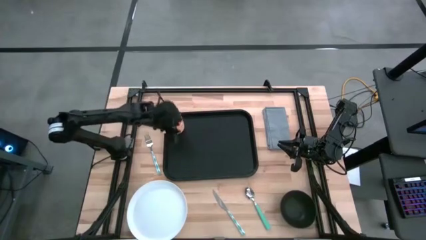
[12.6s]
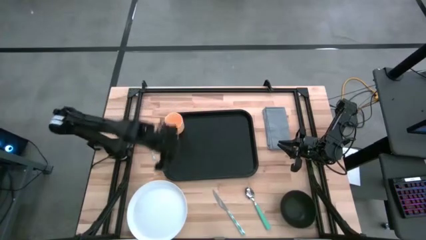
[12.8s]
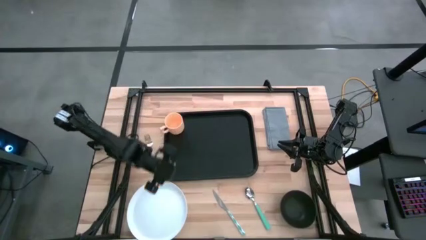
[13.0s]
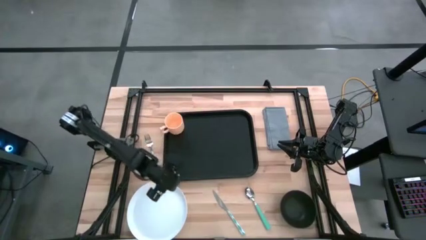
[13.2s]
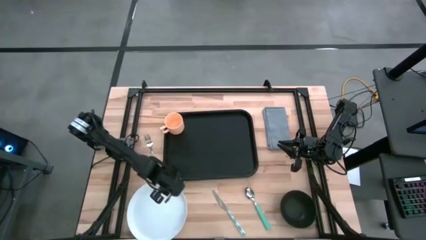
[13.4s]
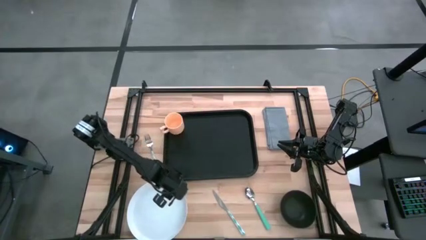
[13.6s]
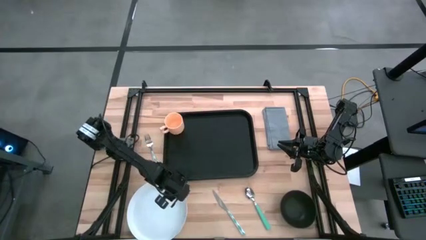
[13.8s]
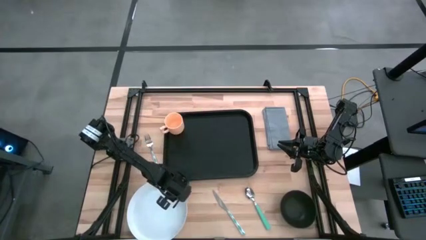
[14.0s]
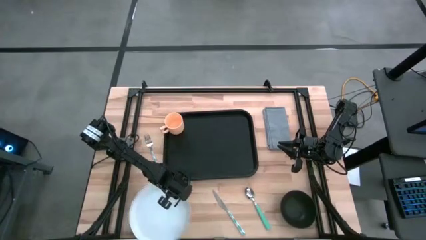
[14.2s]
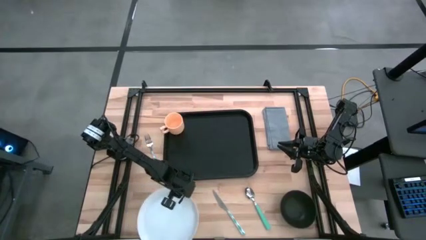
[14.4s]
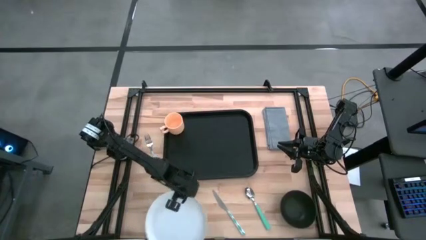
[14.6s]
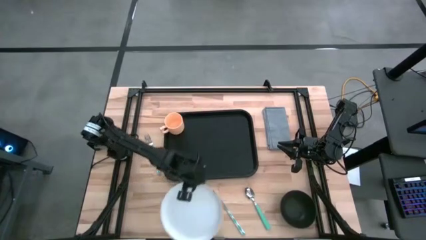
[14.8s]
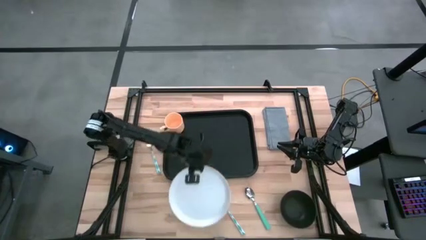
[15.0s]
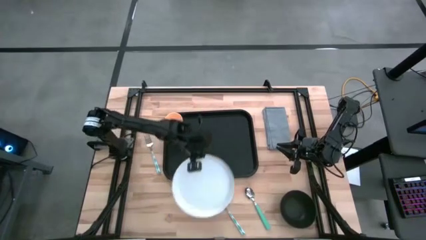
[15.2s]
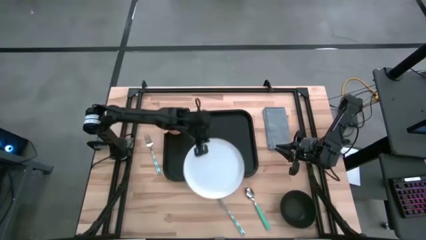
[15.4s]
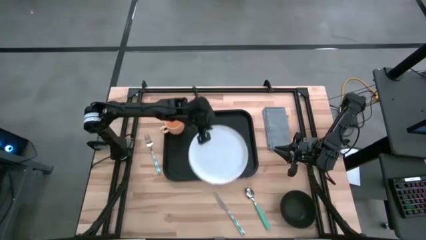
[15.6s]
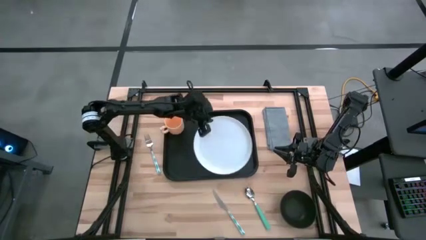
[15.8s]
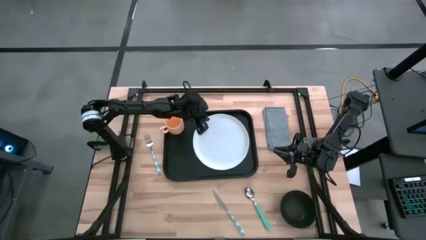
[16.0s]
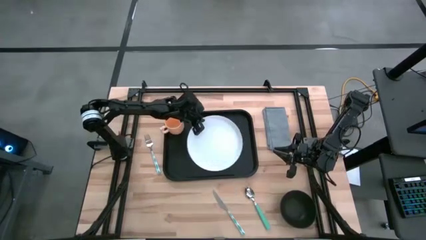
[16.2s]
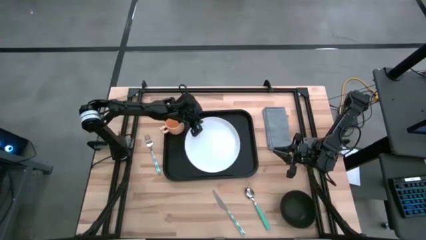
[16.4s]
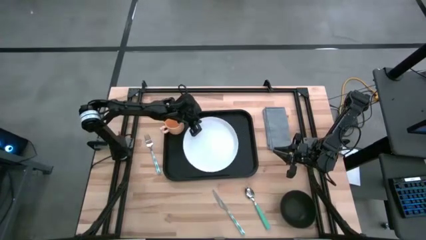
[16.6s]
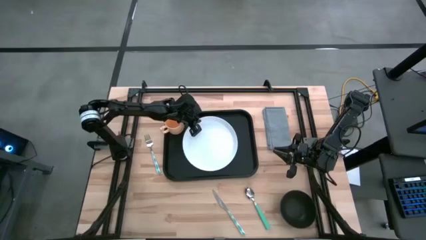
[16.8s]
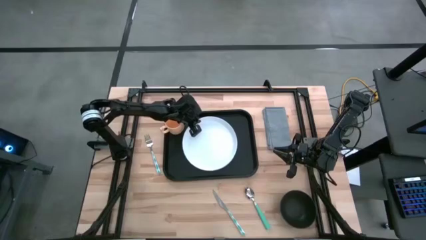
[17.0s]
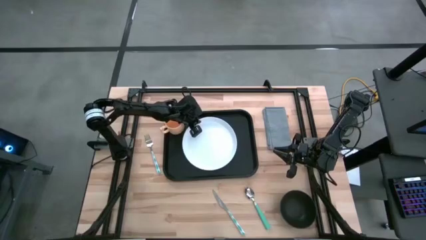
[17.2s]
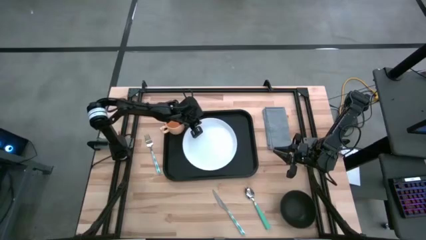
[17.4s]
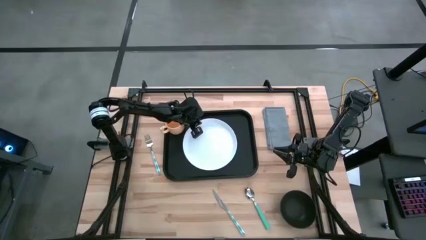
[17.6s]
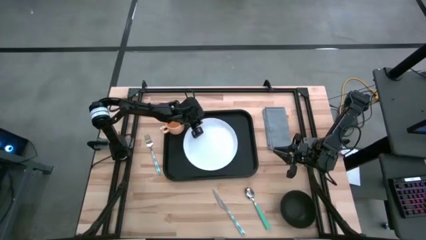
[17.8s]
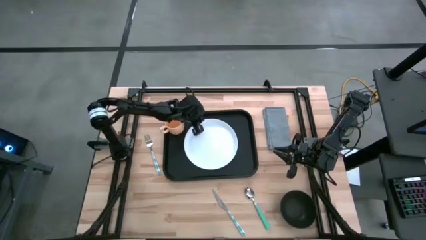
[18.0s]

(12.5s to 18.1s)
Task: Set up tray
Put the white plate on the black tray to the right of the orange mug

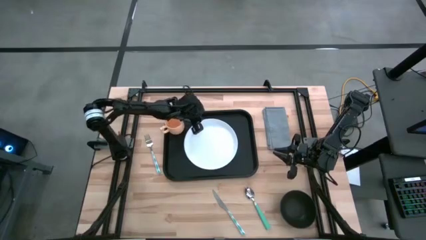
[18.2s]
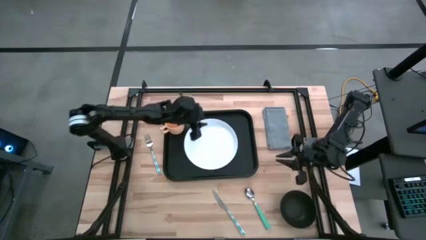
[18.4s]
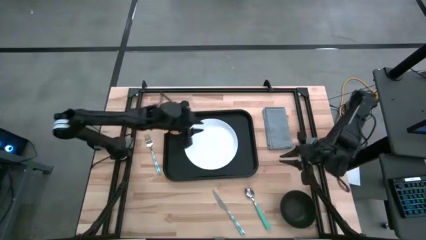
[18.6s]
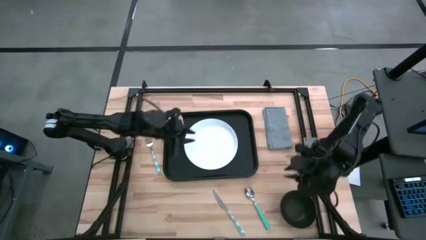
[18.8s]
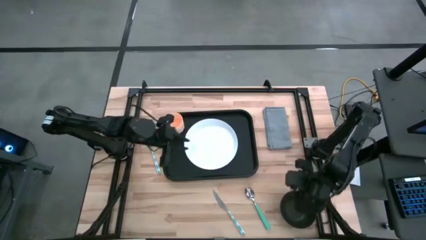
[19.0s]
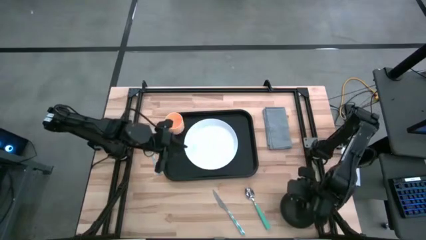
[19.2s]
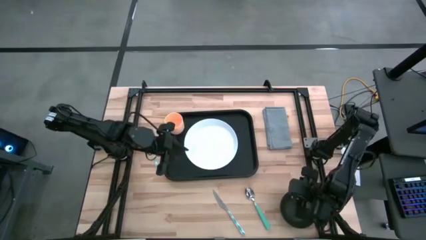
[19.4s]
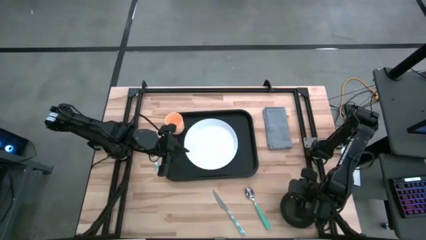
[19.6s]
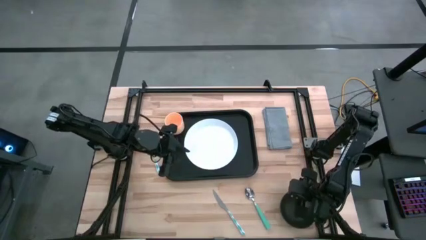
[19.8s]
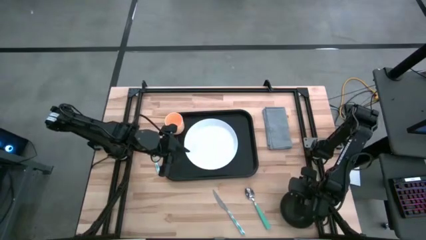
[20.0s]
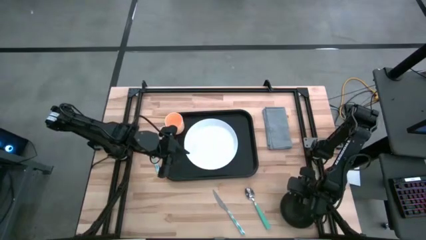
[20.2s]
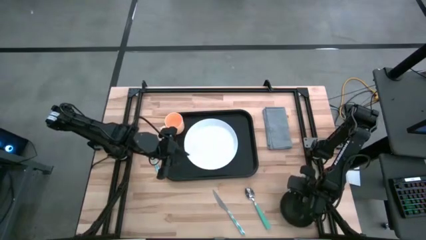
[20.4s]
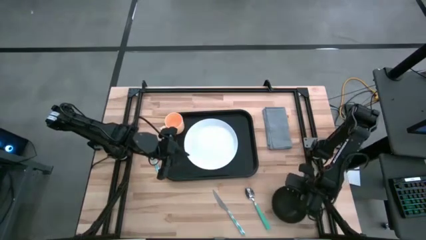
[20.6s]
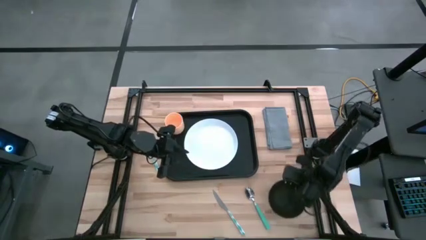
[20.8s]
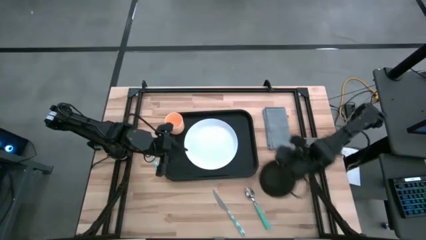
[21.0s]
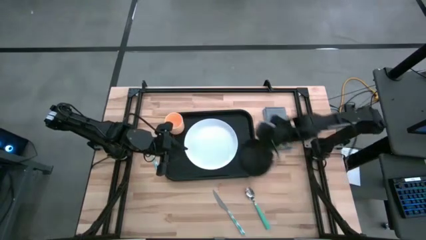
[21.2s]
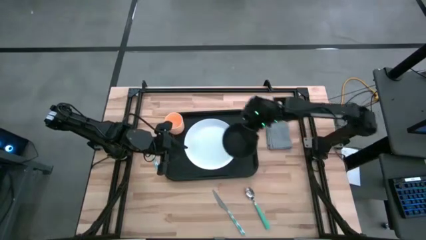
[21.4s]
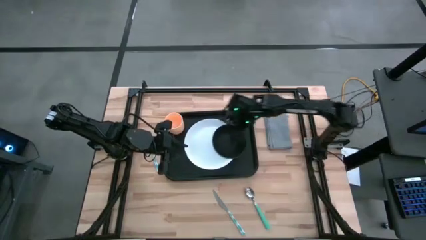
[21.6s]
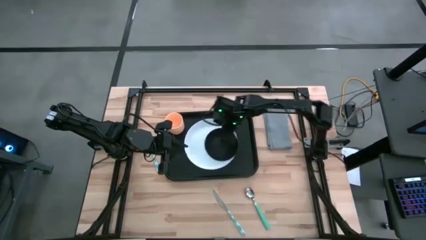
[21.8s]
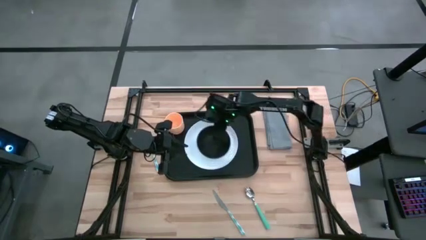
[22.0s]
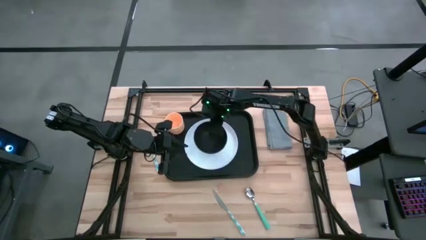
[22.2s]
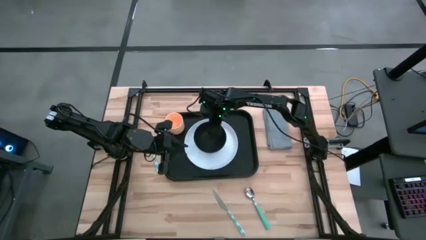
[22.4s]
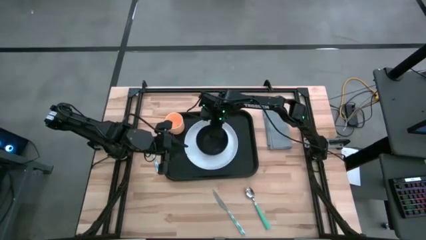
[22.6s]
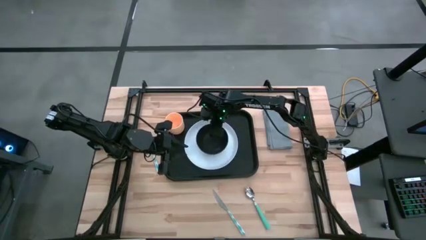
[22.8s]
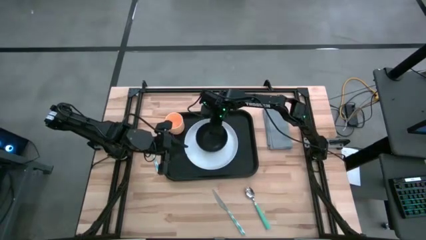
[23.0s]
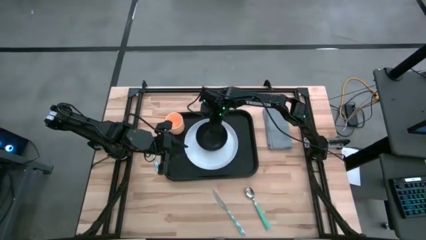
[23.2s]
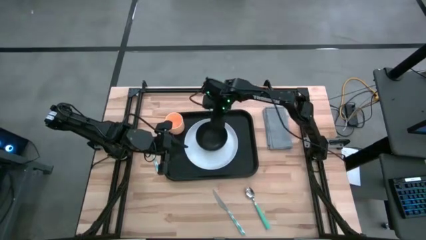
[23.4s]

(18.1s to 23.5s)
Put the black bowl on the white plate

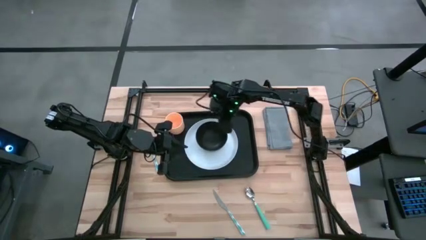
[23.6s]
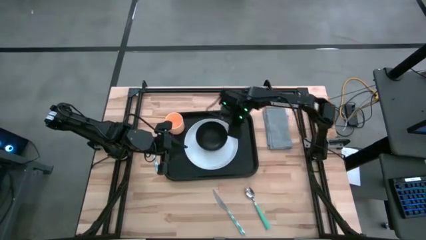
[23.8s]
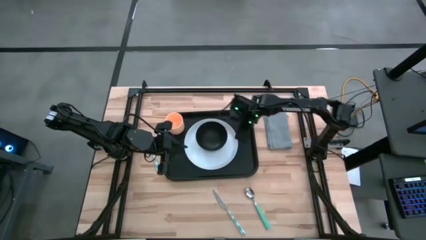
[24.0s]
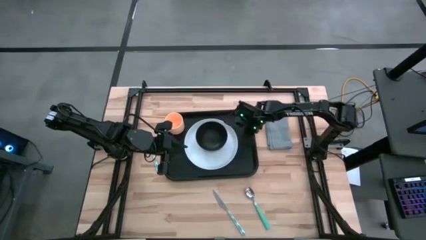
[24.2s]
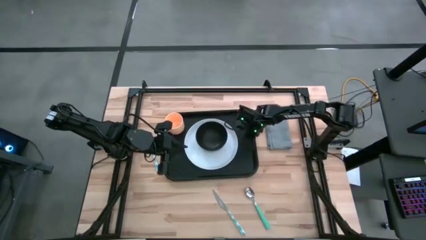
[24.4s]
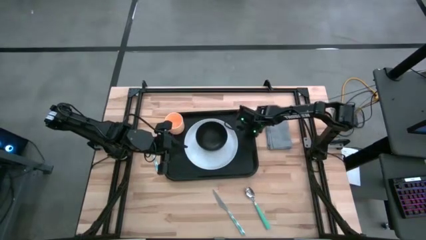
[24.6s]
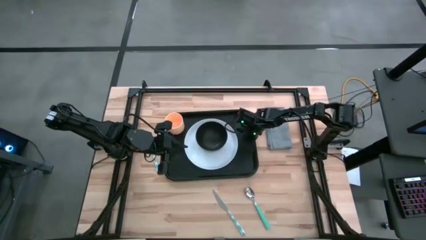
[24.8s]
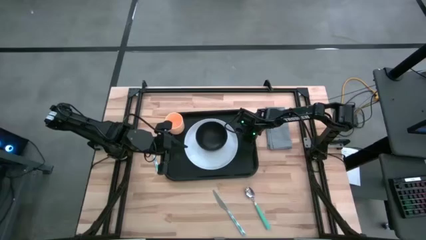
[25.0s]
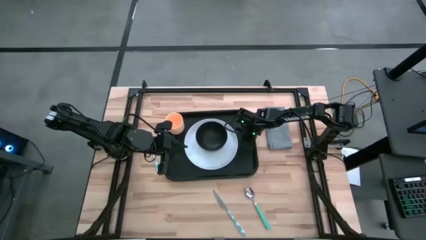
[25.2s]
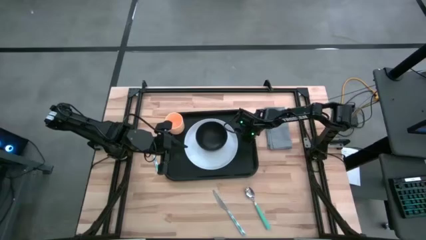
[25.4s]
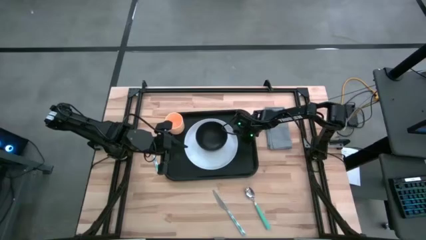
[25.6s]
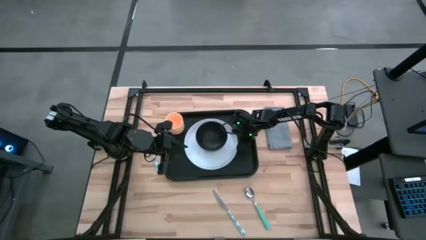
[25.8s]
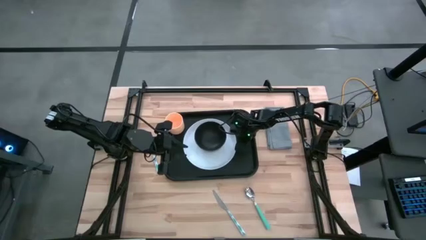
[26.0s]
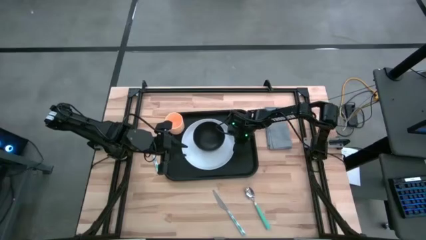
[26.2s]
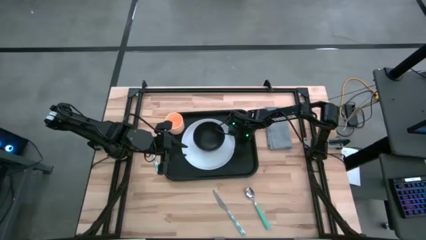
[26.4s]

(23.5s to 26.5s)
Adjust the white plate

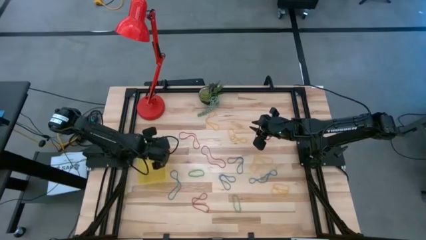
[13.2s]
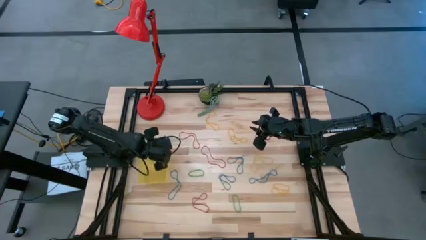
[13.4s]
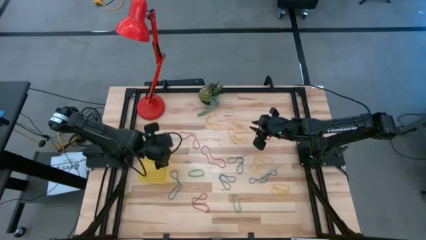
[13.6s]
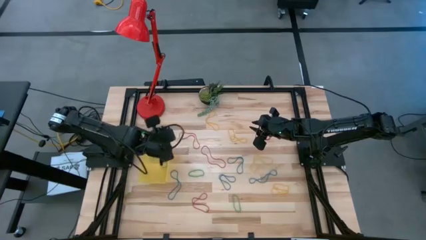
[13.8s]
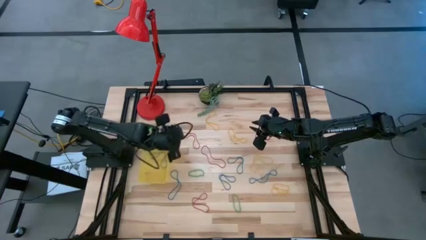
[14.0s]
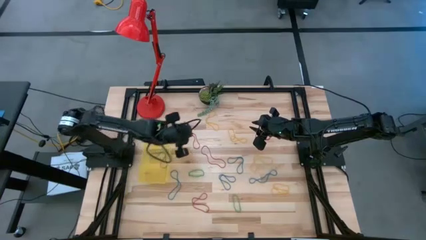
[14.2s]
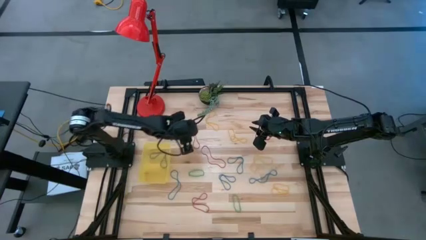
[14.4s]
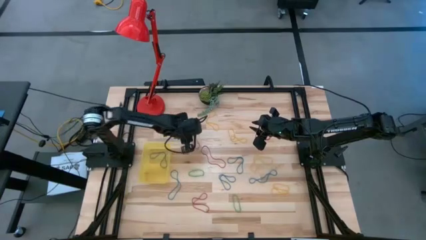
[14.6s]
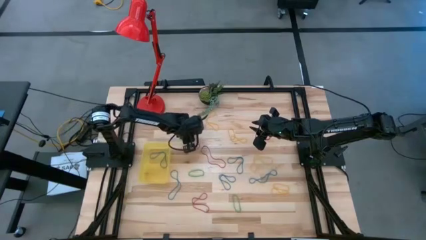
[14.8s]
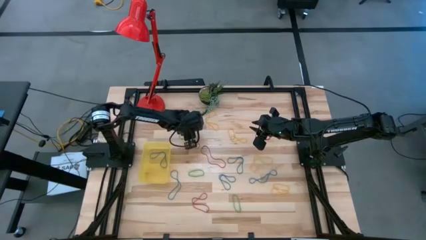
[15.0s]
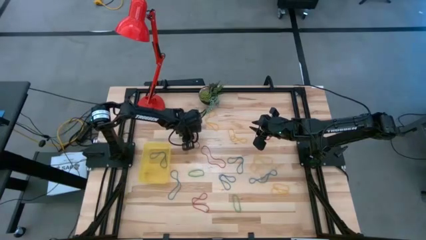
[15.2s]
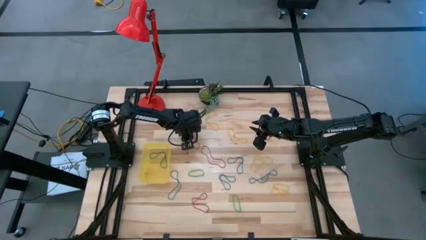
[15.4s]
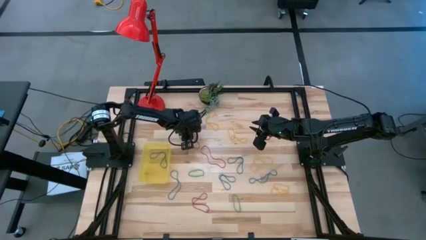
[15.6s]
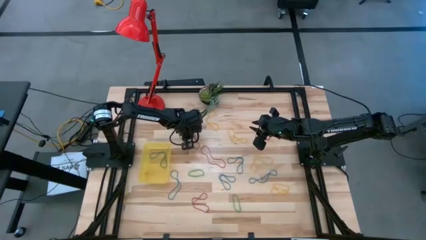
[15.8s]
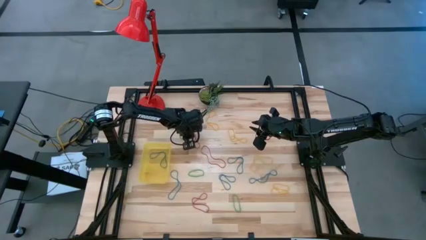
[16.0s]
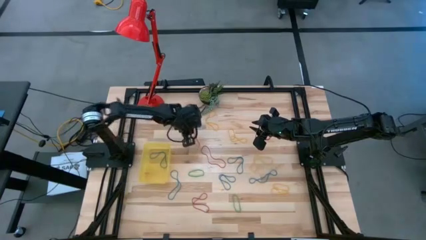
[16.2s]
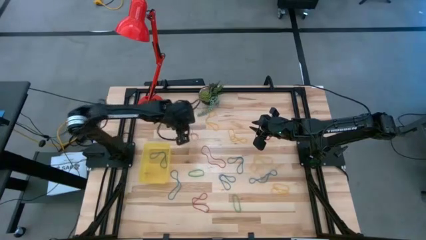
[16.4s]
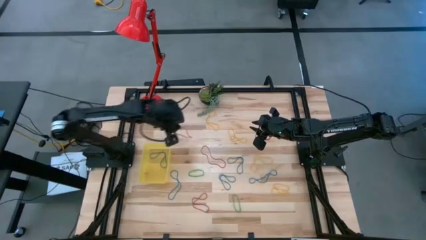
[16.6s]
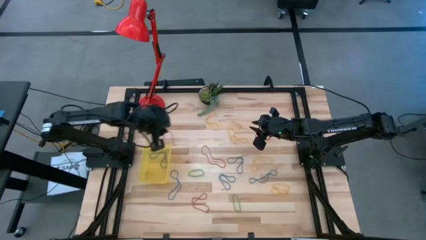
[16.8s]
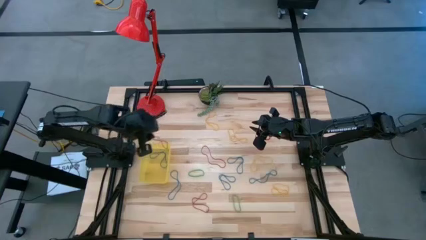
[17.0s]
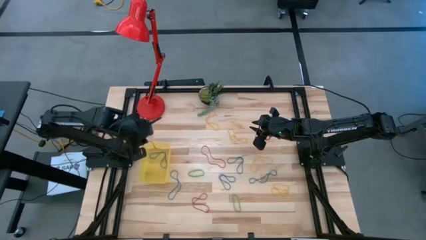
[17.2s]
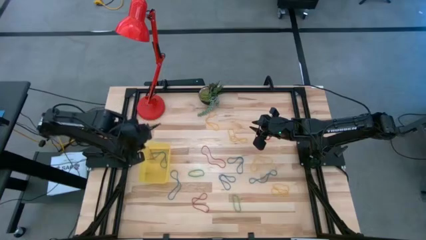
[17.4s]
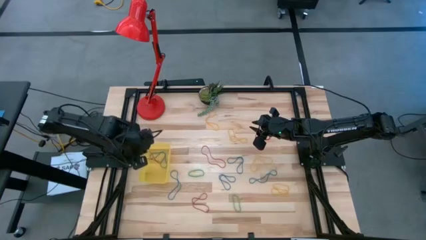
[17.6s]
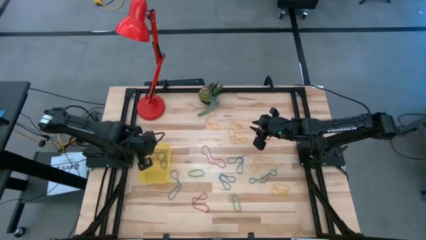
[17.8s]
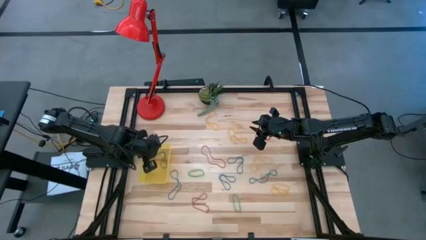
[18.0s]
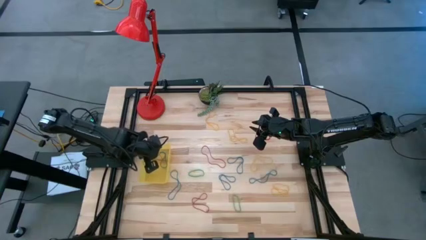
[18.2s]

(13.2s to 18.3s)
Task: Pick and place items into bin
Put the red rubber band into the yellow bin
